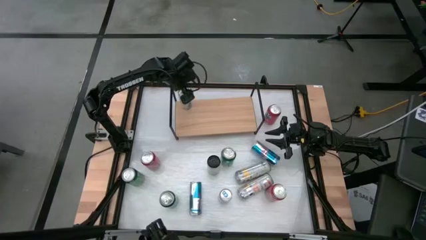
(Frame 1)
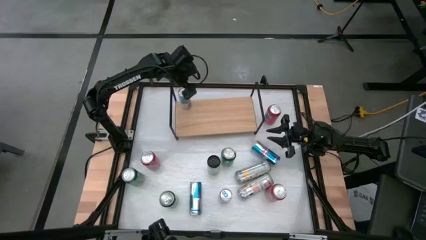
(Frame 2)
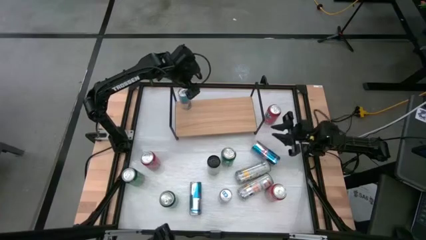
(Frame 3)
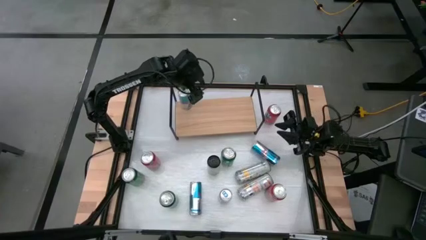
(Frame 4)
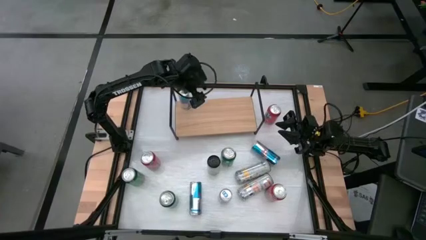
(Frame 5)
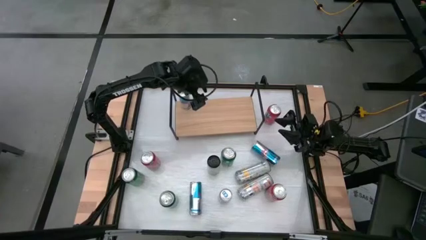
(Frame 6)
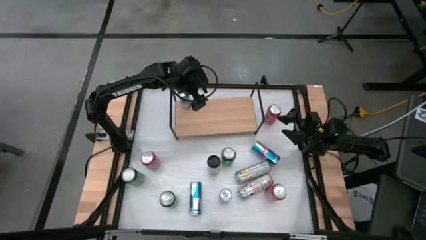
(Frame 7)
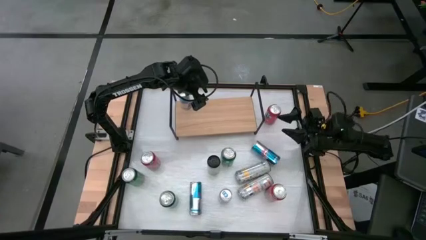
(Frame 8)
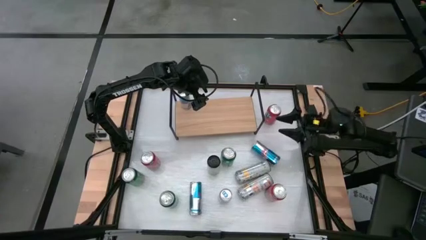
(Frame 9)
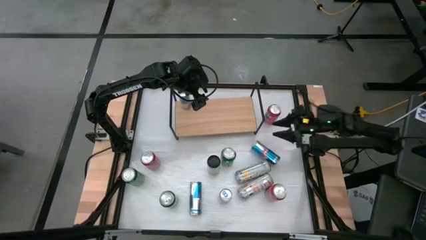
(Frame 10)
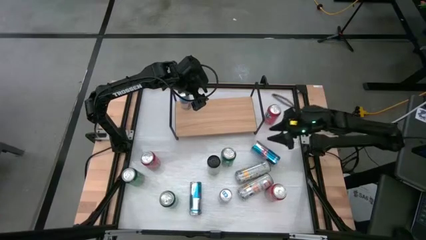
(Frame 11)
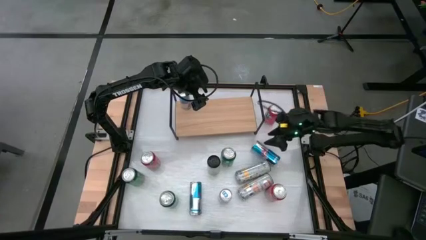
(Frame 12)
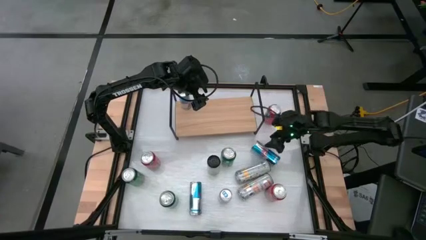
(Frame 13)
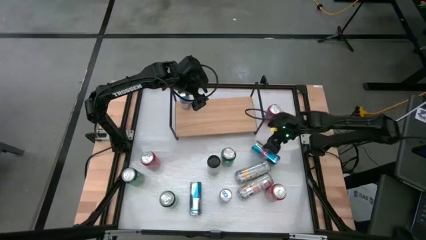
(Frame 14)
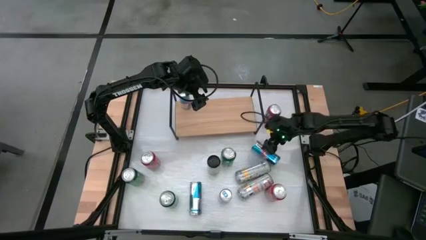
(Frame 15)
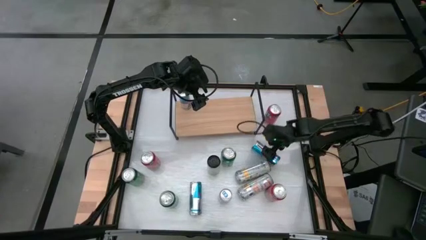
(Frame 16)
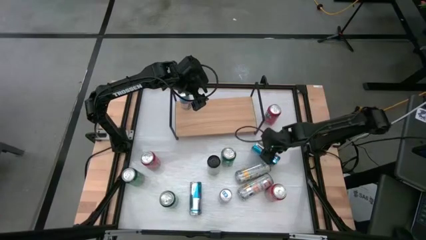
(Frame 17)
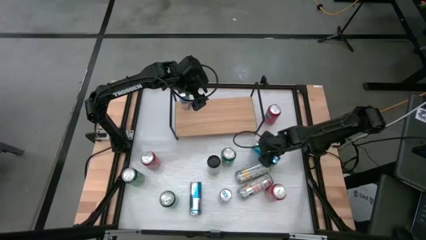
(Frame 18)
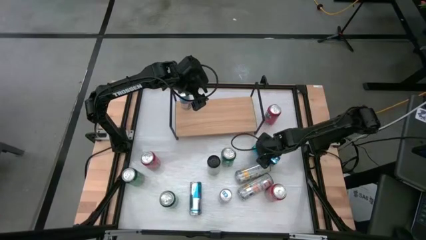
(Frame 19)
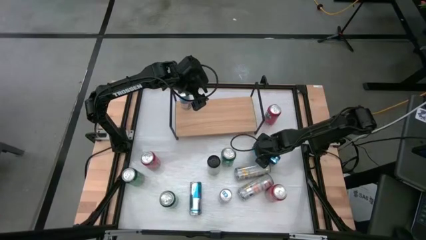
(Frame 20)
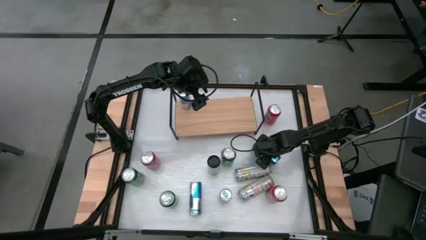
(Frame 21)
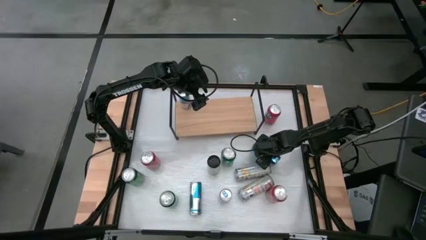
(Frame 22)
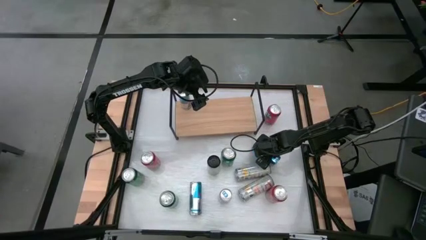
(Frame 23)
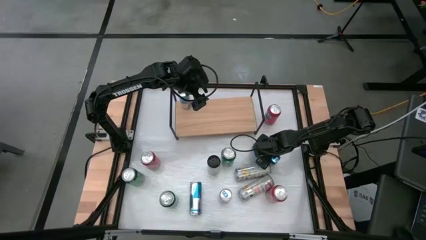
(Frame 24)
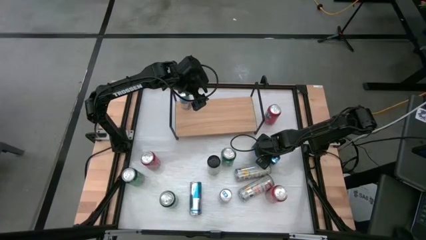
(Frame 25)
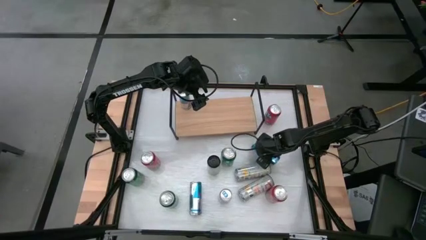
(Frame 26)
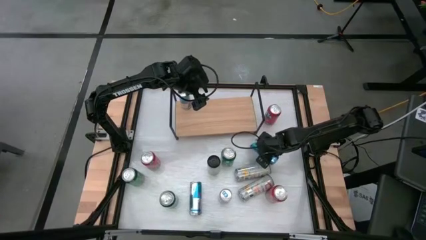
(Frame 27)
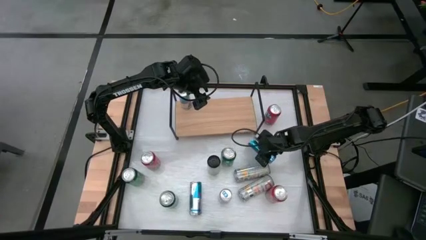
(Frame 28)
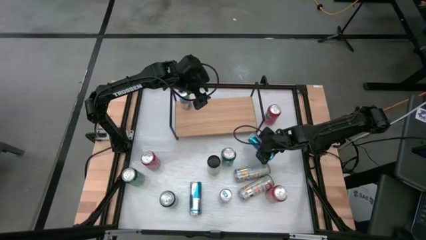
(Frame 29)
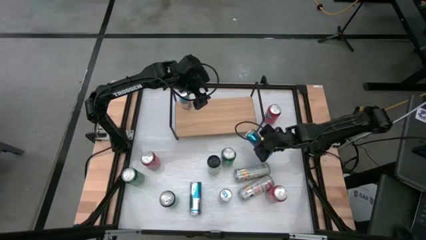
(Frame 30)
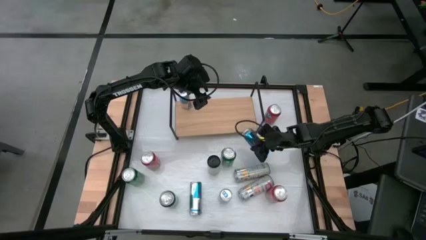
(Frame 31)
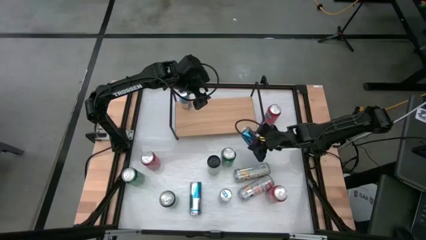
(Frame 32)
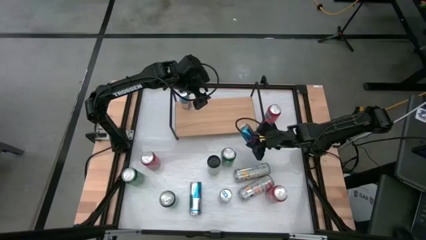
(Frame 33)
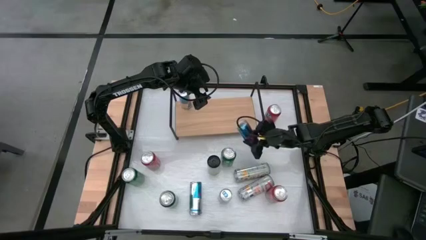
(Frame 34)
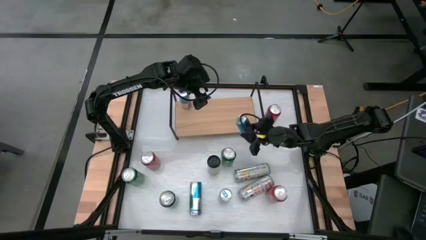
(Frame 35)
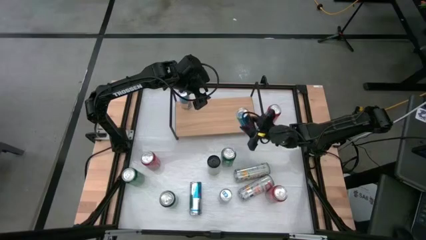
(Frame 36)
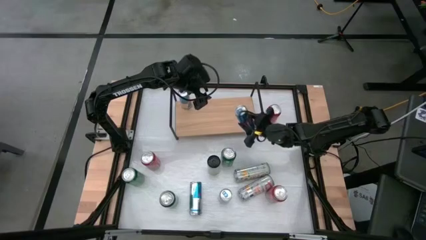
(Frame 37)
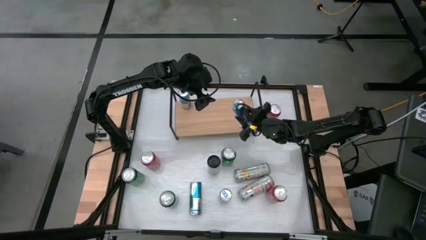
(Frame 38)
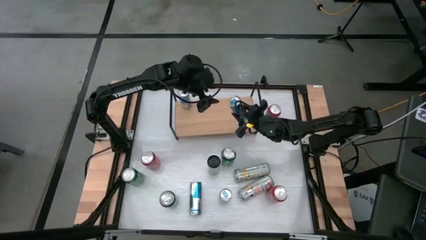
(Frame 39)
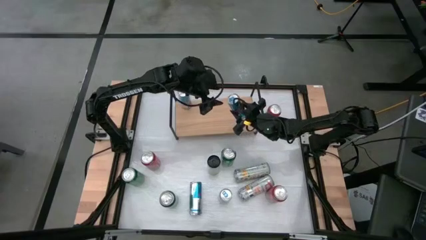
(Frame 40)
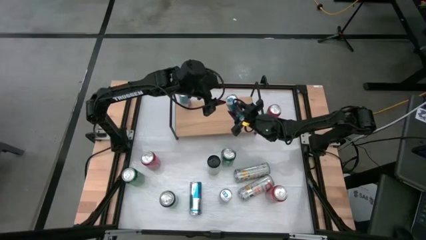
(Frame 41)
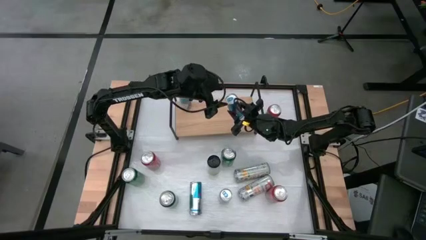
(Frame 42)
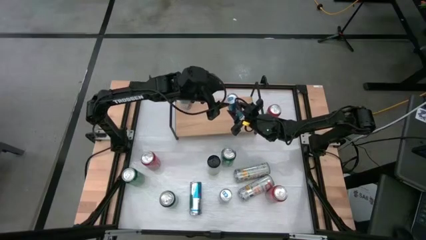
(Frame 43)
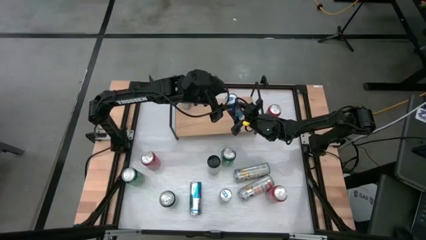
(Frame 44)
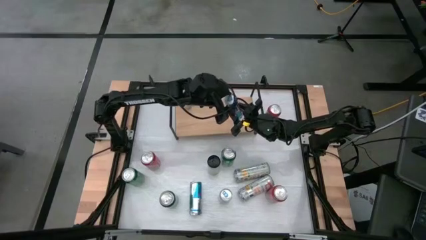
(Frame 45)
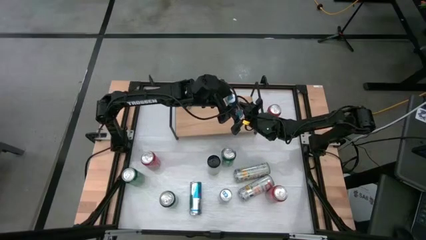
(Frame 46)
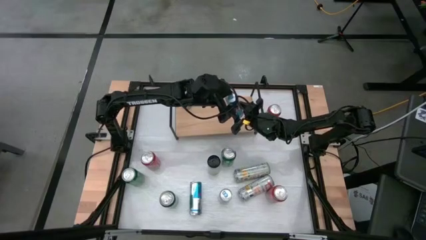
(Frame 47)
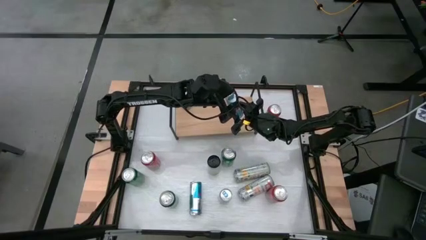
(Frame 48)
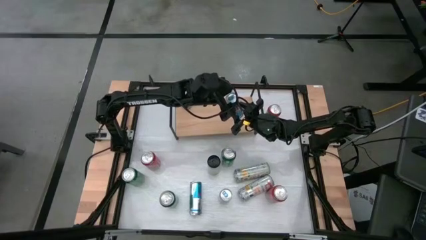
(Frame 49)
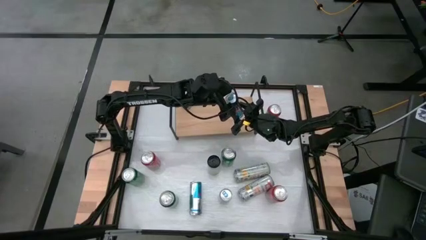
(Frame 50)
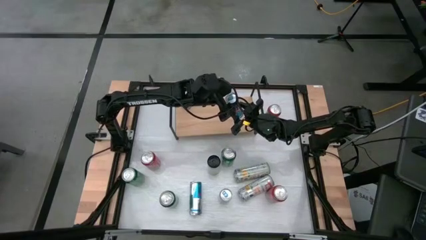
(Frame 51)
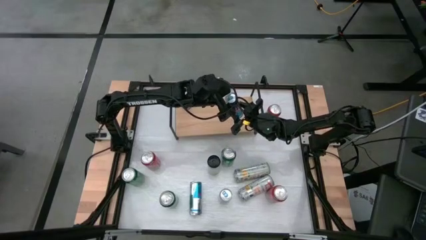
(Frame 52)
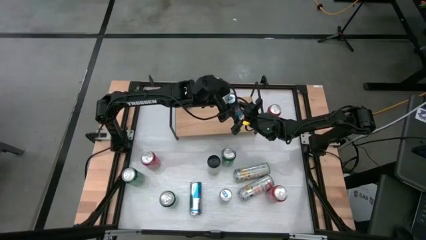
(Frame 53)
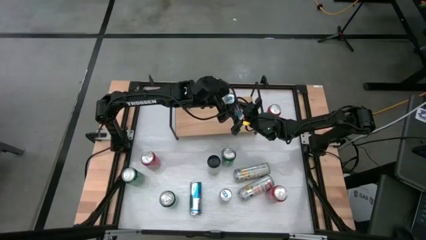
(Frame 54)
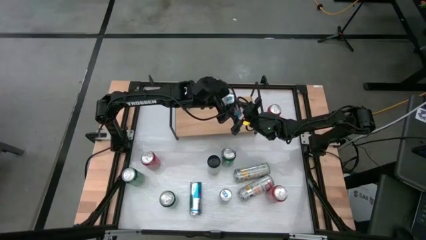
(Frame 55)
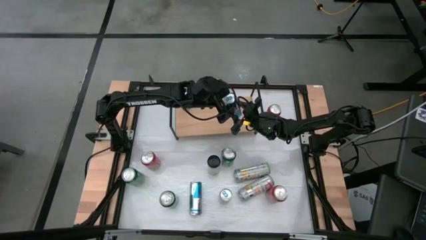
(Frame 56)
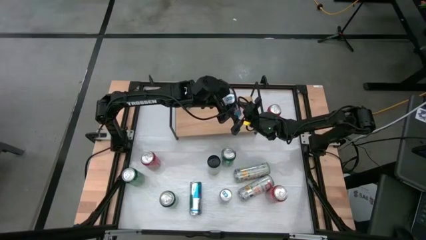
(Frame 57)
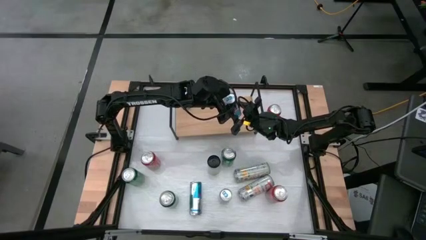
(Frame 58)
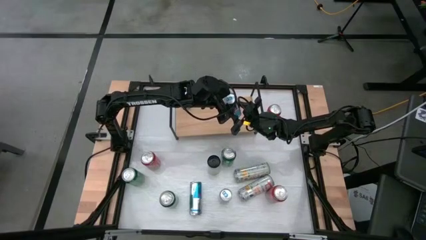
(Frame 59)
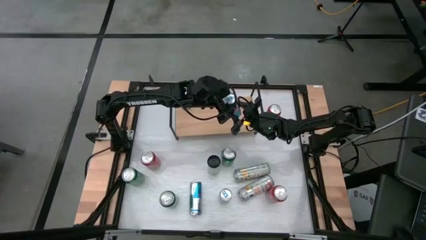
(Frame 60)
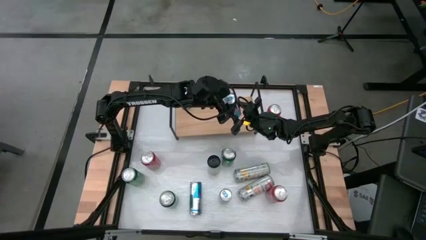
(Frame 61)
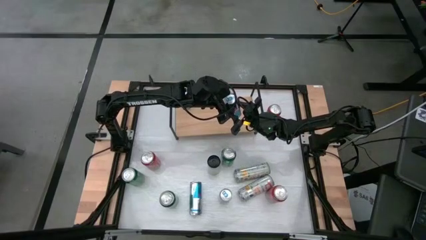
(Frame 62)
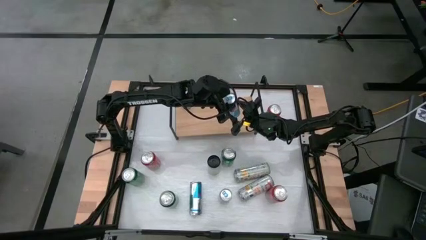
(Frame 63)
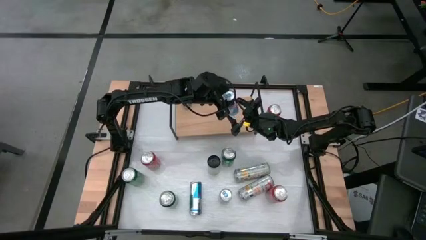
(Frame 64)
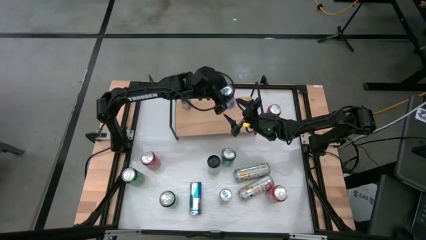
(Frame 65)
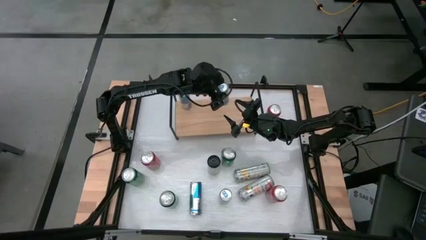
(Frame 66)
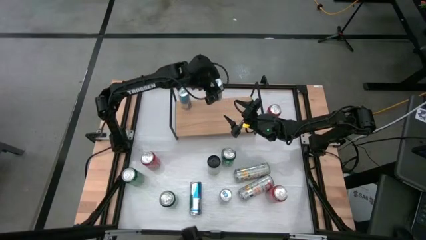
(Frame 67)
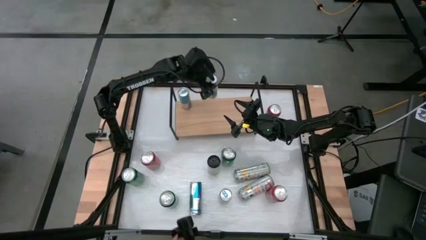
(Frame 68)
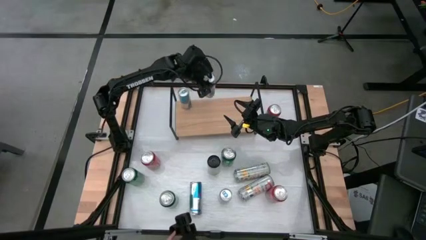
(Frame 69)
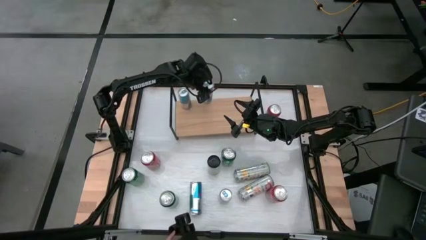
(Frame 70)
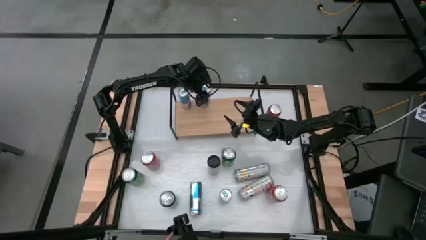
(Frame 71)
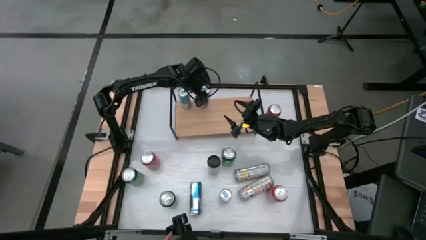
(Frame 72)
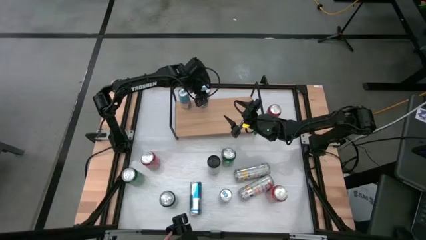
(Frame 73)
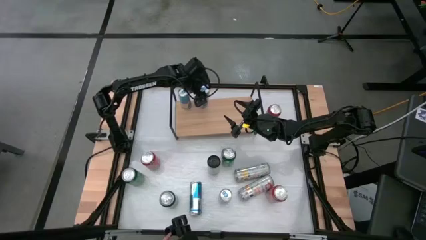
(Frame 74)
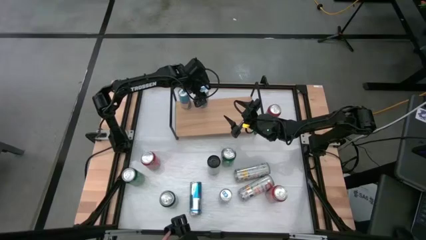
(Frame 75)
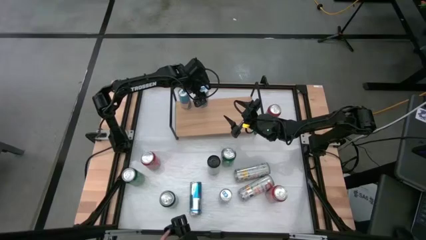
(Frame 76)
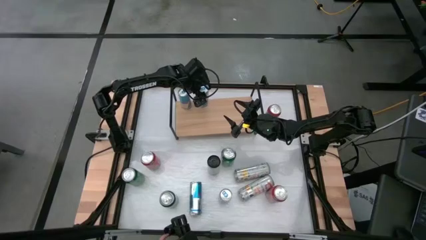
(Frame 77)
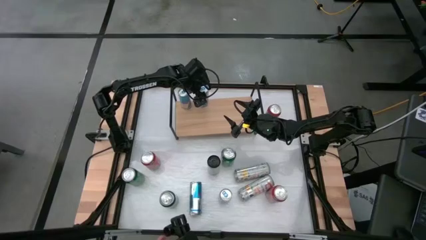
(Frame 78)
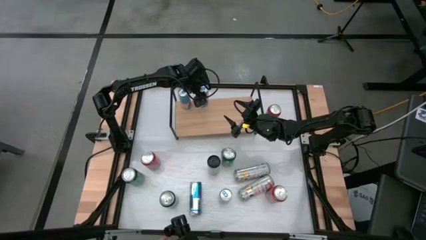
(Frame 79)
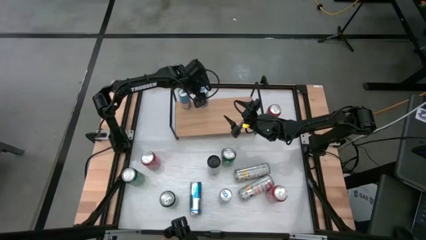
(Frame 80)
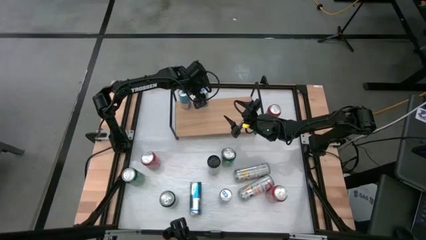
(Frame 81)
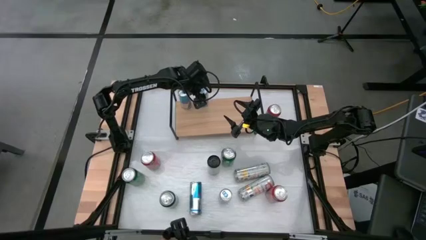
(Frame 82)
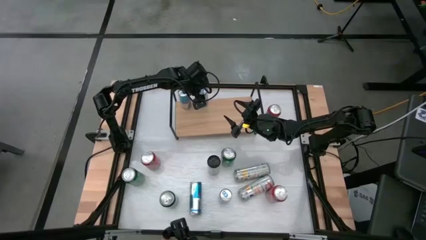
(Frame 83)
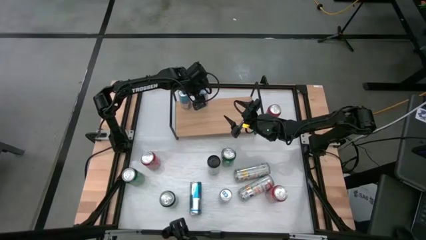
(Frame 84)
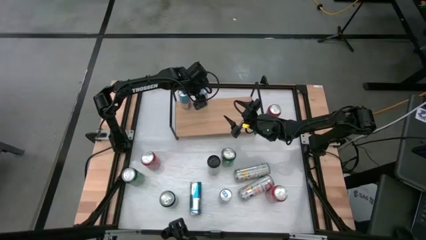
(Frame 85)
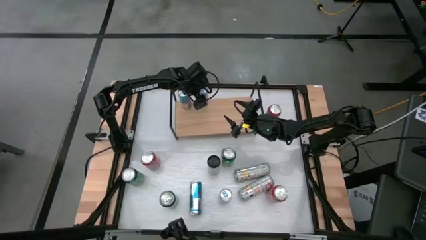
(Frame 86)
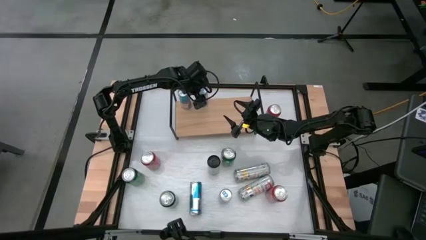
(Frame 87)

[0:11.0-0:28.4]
Task: Sort soda cans
Put the blue soda can on the shelf
